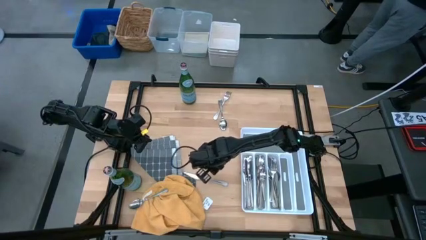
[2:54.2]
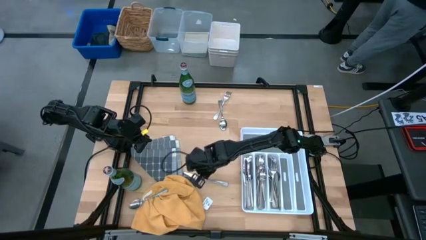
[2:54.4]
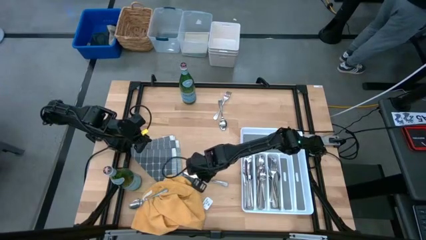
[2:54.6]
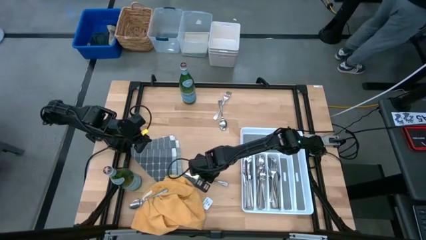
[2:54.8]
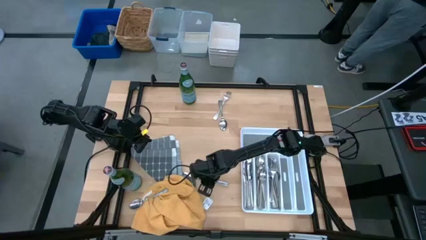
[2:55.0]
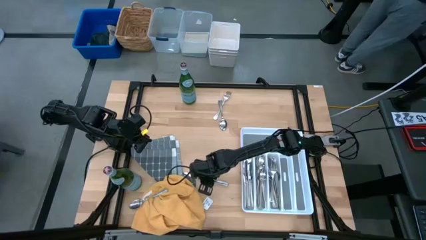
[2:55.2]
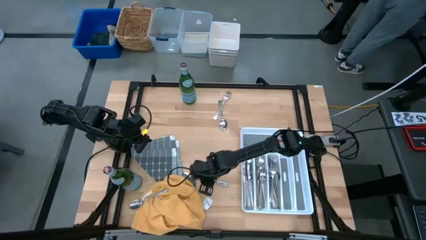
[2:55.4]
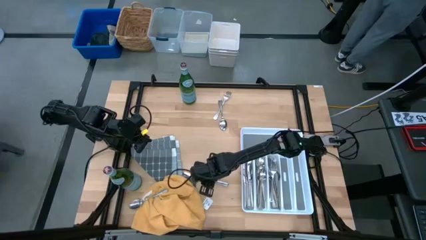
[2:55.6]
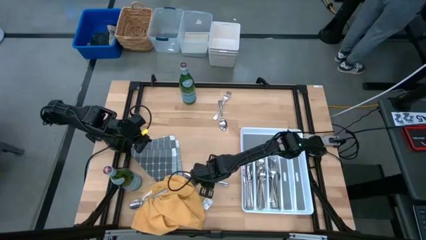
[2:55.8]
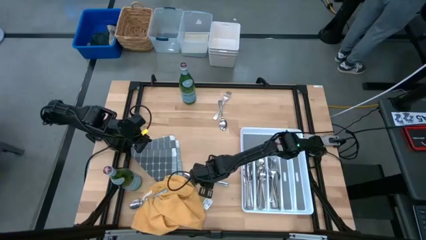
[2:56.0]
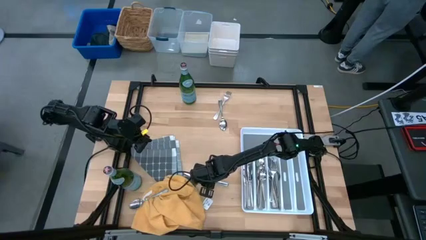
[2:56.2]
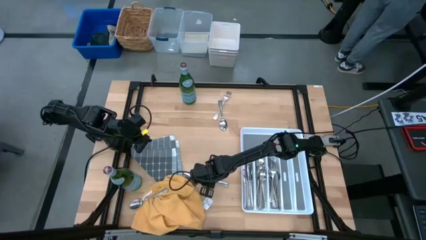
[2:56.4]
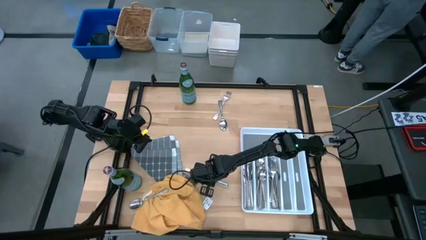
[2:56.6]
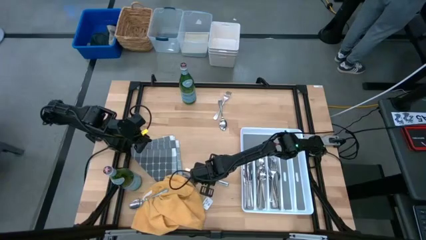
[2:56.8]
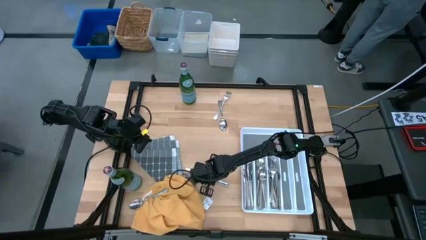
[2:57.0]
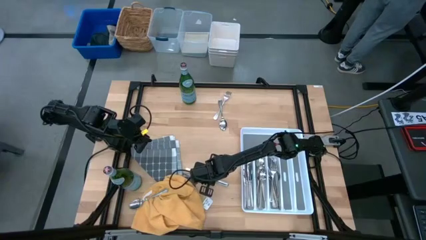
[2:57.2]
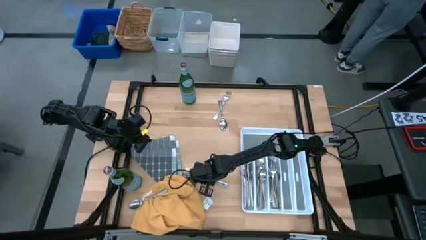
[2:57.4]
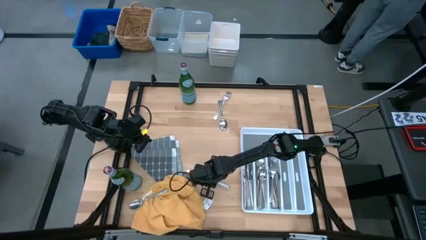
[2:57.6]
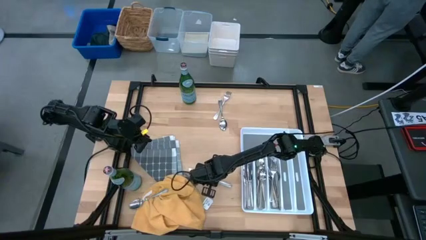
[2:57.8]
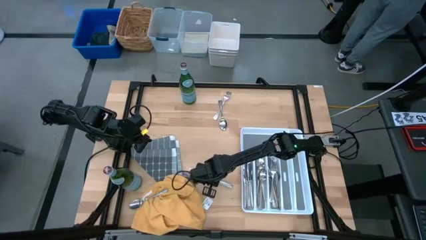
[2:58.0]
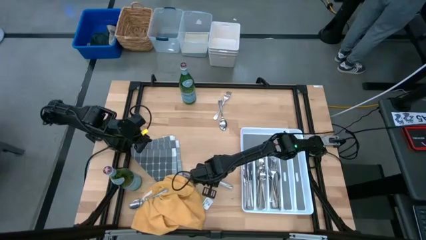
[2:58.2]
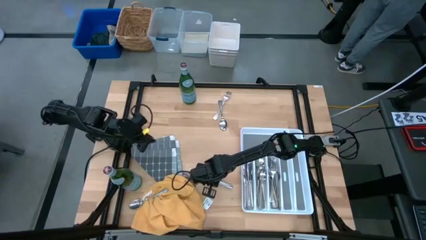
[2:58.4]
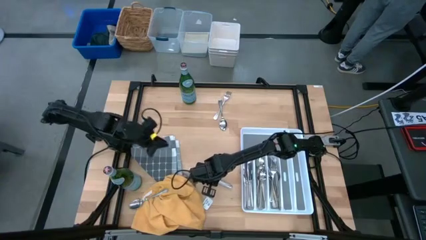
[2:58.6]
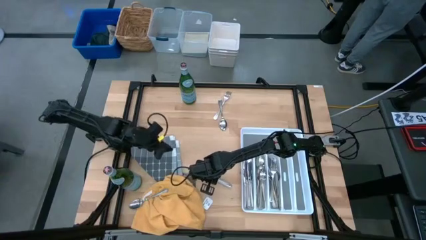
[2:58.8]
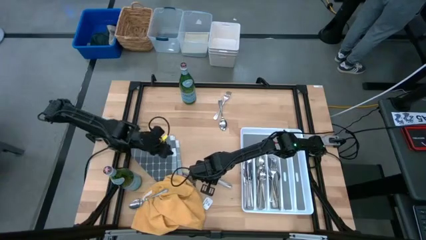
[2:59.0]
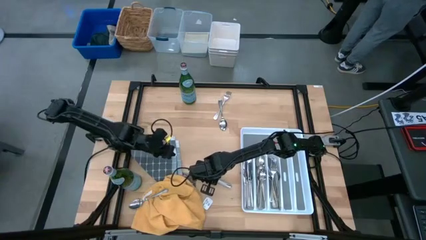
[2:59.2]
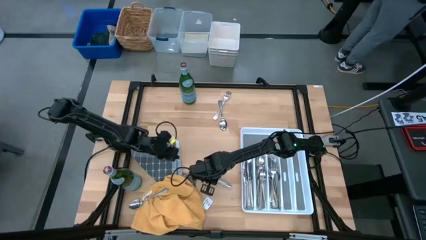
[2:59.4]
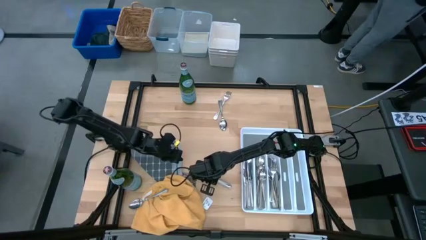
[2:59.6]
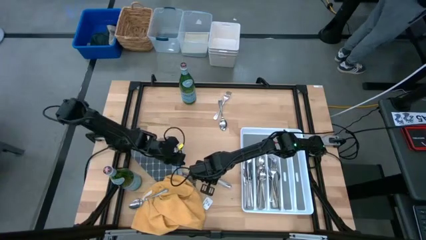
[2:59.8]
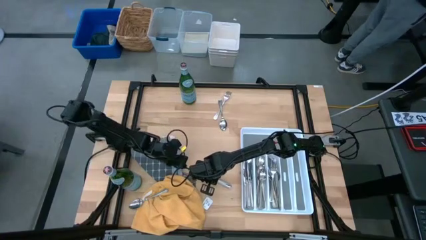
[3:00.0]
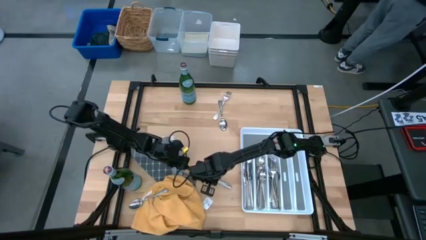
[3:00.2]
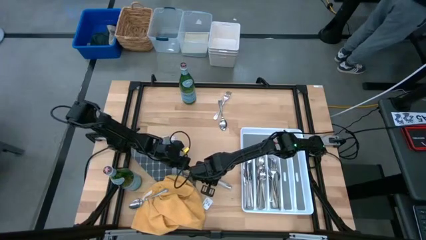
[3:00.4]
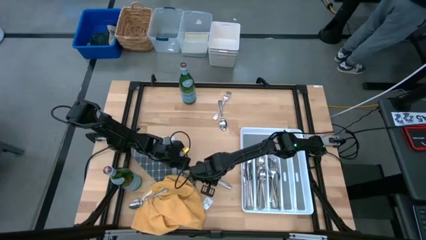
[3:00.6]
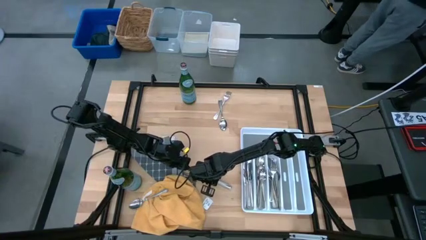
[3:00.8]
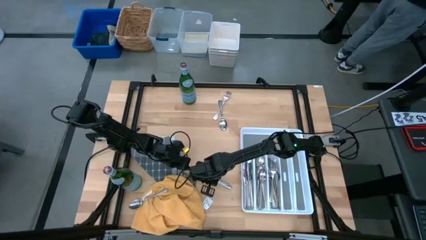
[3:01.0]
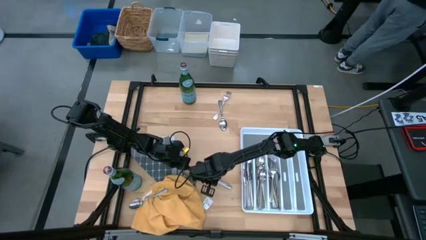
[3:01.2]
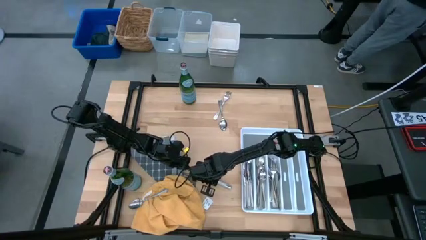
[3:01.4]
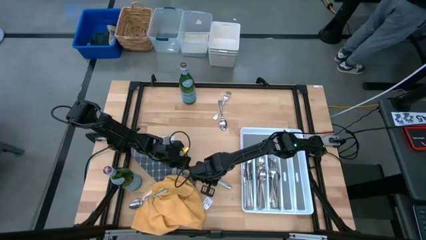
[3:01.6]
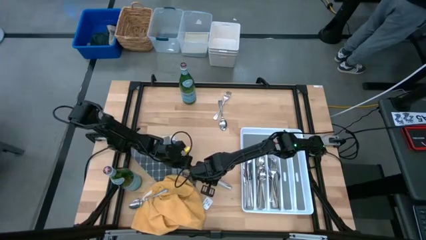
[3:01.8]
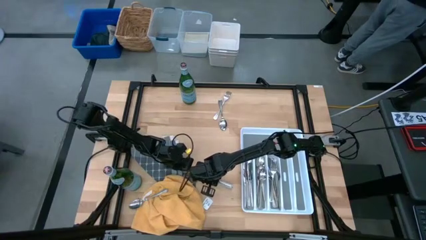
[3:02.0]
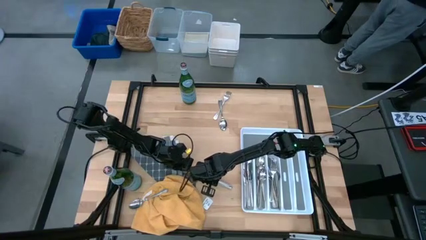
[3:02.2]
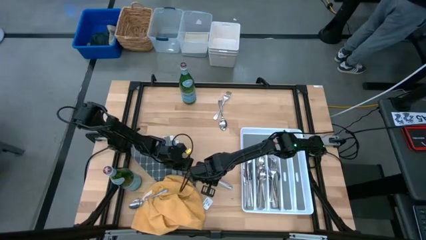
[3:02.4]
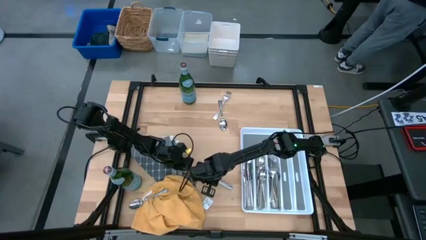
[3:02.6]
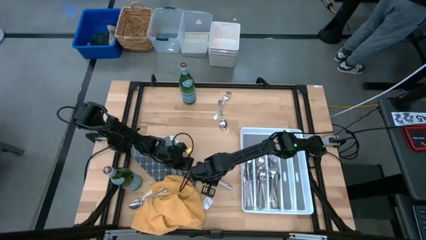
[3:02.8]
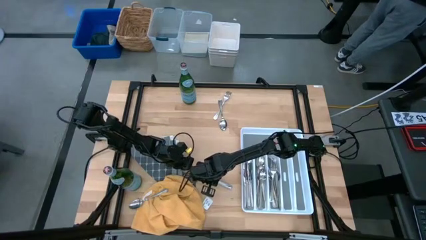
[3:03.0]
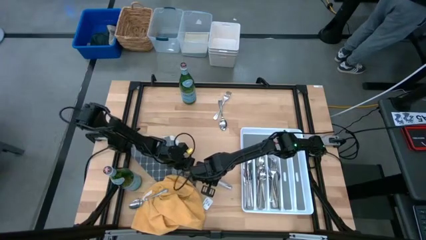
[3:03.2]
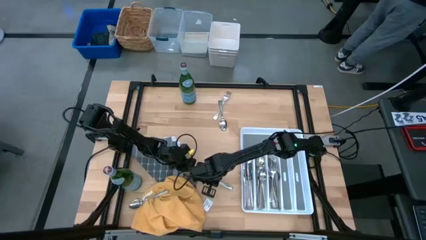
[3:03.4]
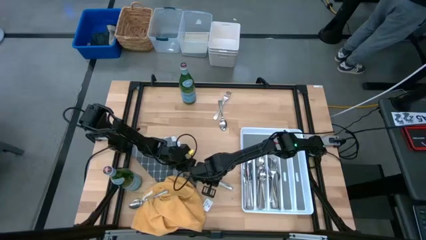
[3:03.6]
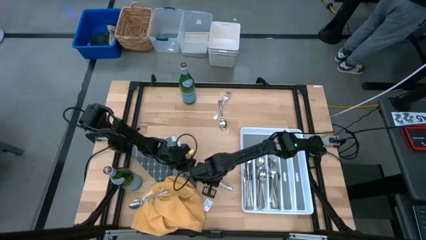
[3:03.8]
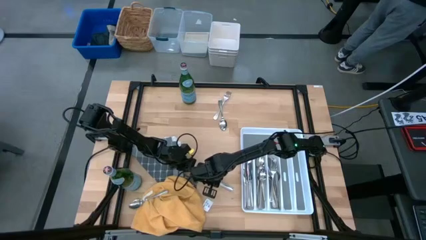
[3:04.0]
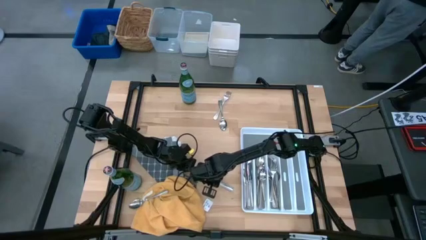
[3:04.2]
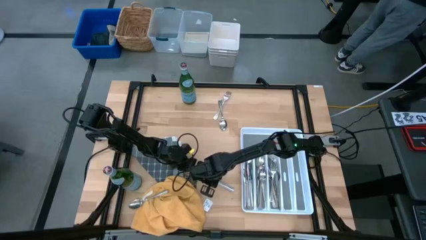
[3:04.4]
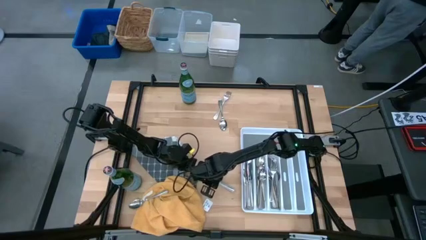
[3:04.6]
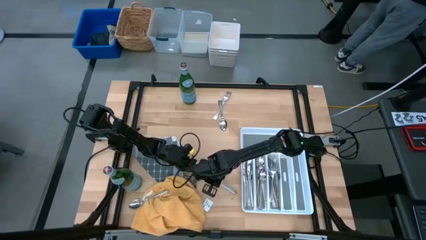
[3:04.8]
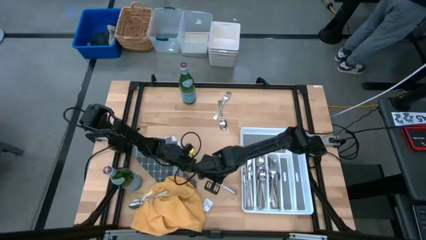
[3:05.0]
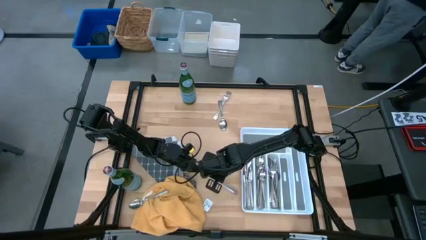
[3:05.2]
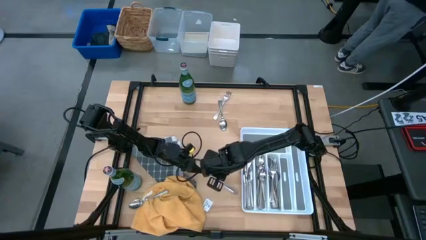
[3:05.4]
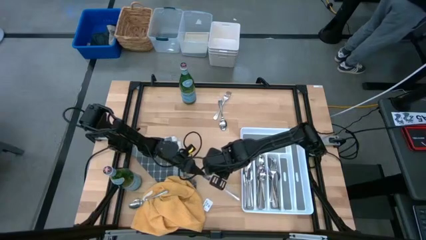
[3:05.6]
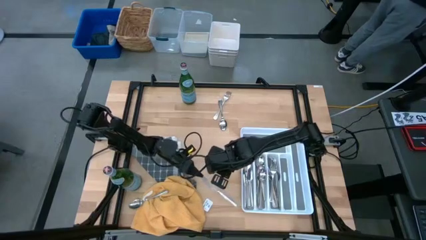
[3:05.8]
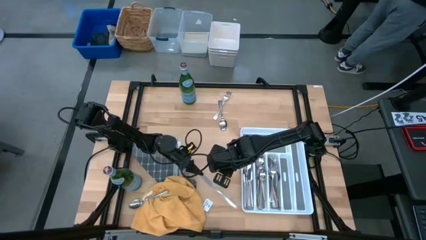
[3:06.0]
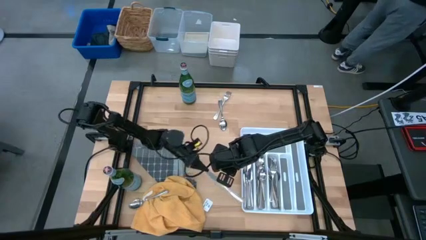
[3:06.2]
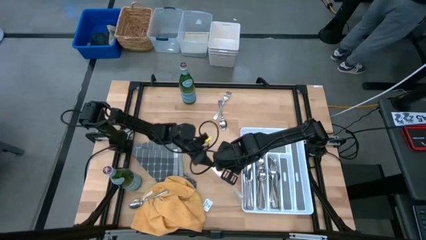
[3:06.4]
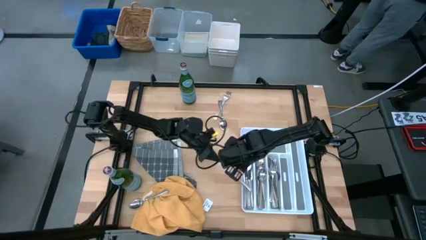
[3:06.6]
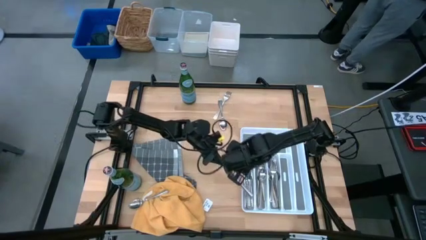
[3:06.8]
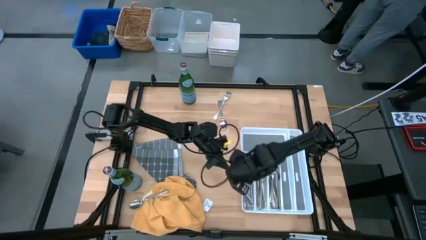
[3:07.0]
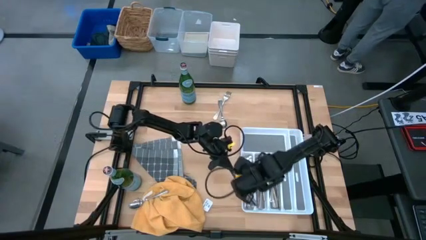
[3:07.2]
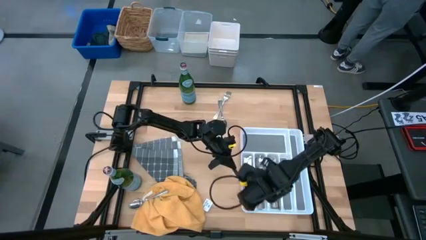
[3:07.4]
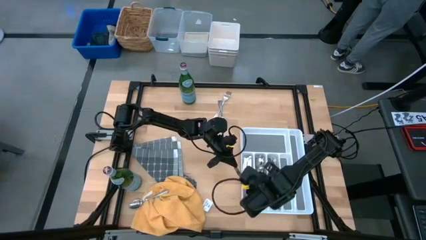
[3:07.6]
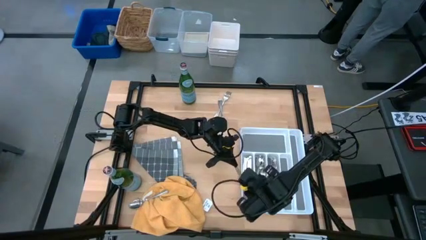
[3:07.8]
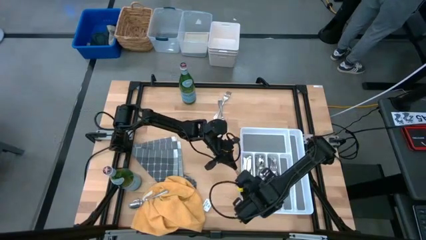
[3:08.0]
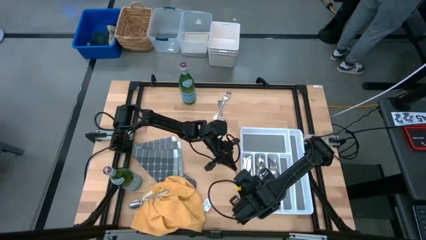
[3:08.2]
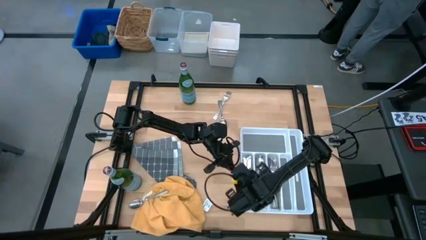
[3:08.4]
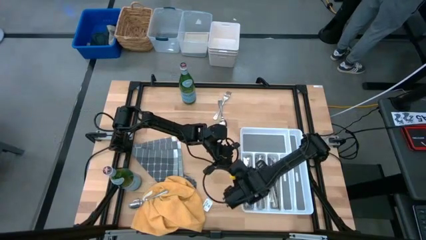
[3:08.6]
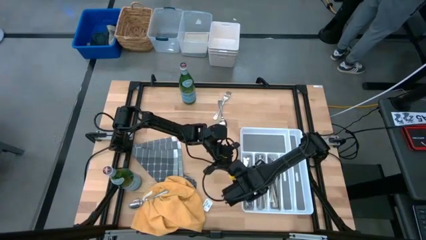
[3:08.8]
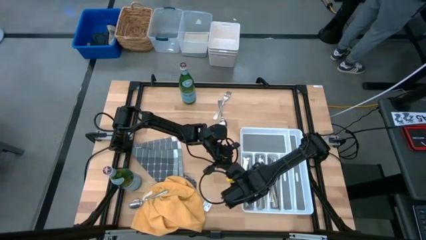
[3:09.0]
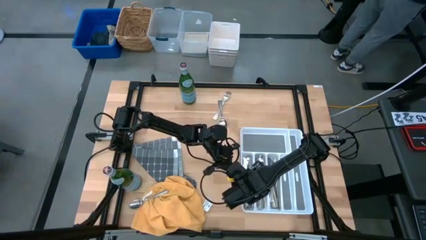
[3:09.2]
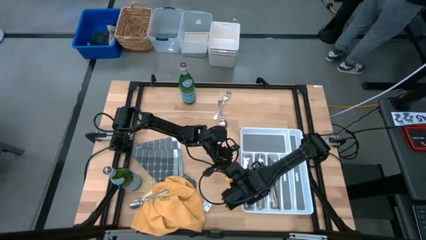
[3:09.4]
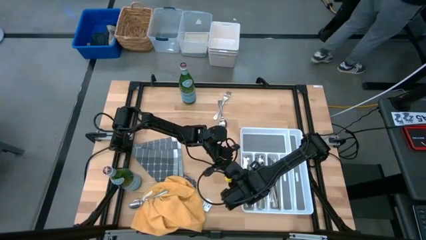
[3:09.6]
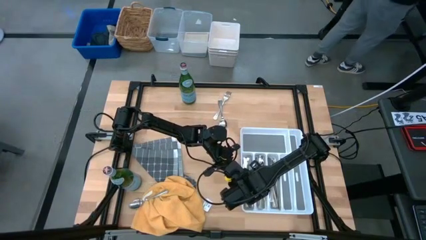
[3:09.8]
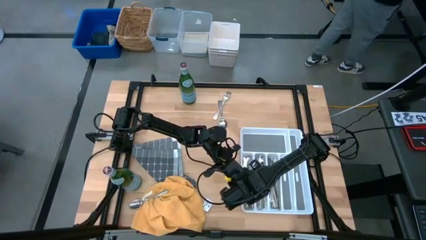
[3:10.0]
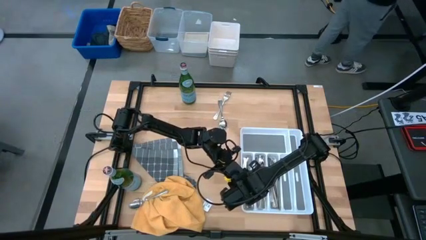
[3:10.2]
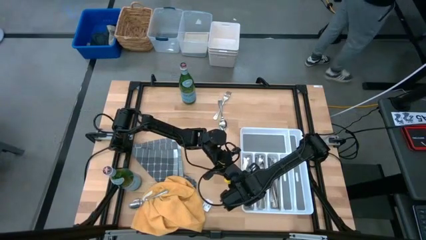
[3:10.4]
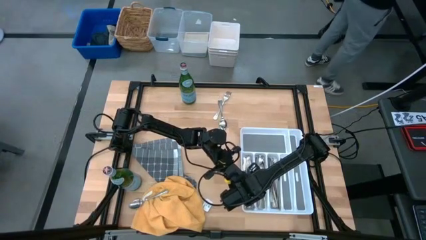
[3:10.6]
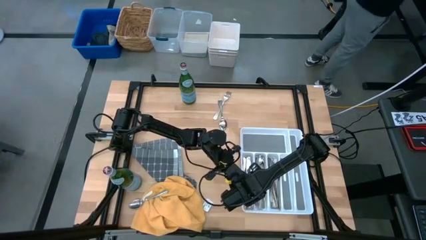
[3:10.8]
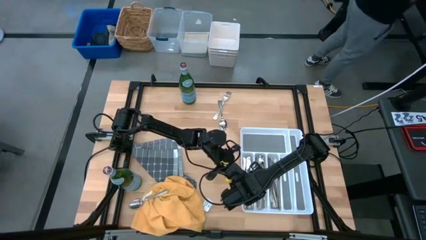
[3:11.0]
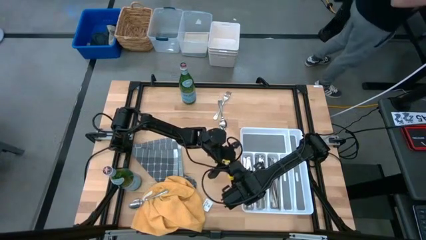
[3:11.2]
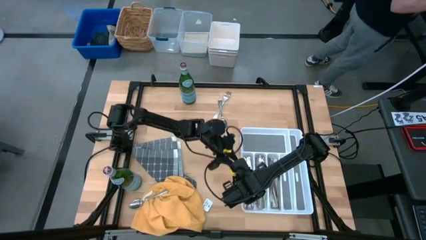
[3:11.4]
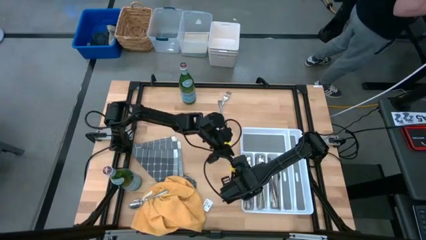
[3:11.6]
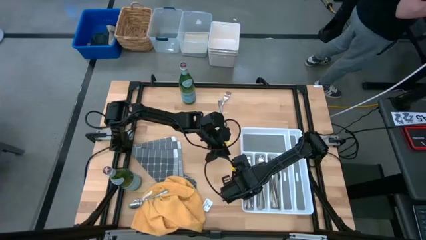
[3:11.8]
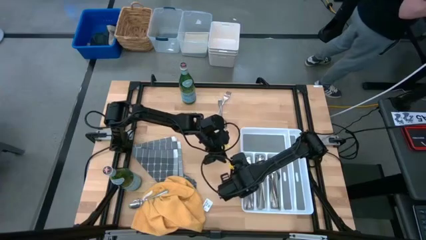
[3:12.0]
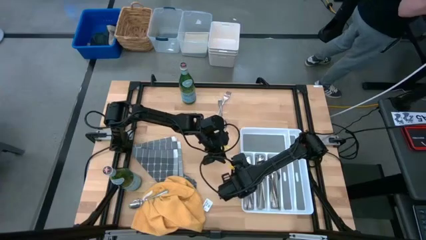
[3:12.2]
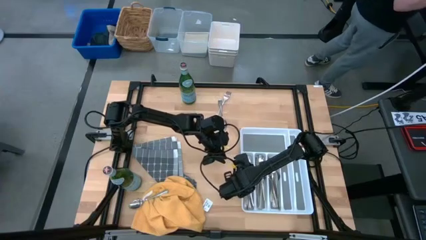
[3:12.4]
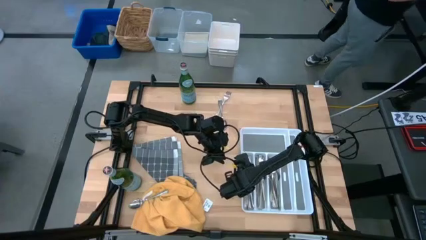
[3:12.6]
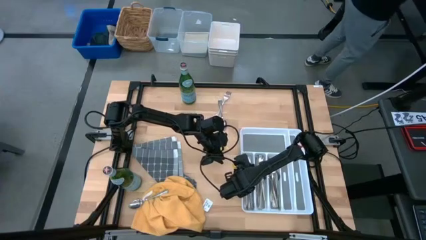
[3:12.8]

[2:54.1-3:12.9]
Stack the silver knife into the white utensil tray with the other silver knives
